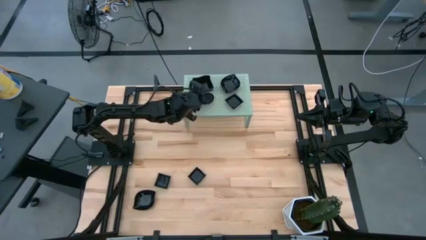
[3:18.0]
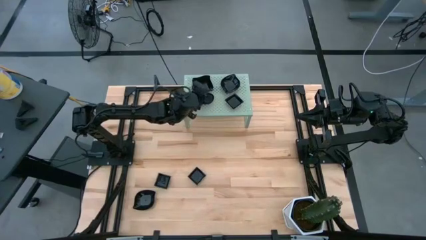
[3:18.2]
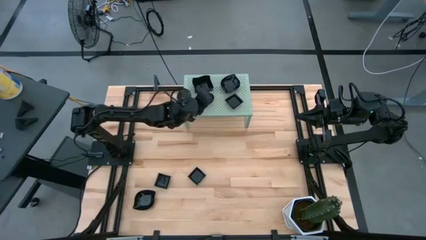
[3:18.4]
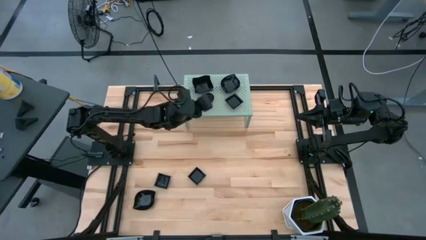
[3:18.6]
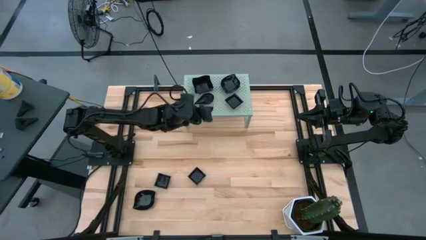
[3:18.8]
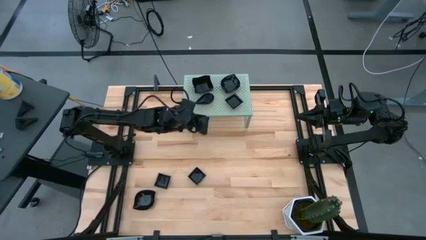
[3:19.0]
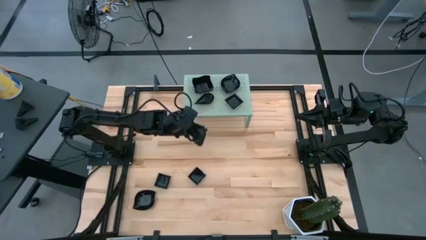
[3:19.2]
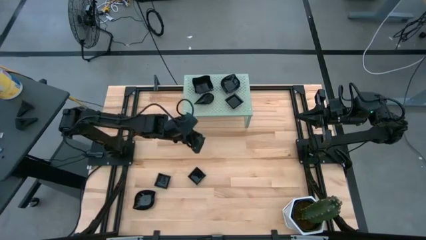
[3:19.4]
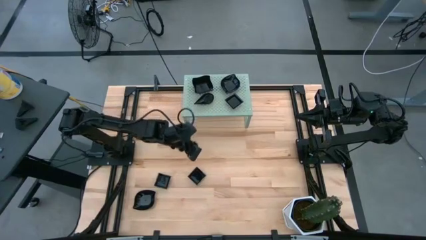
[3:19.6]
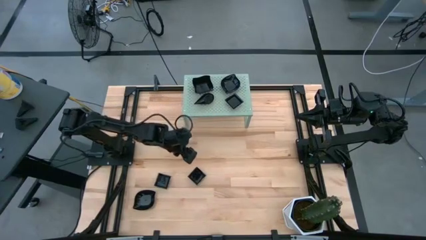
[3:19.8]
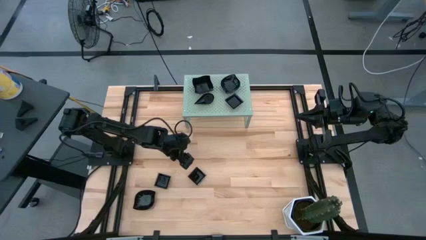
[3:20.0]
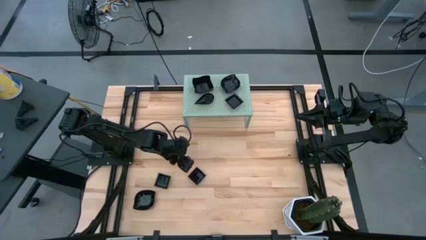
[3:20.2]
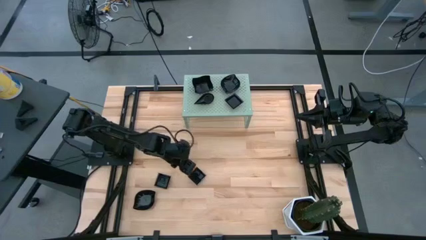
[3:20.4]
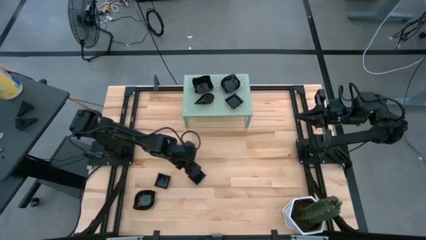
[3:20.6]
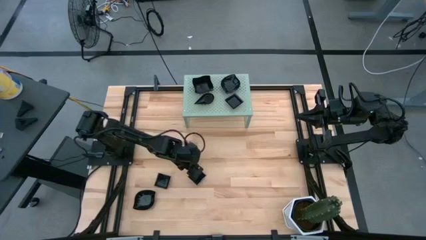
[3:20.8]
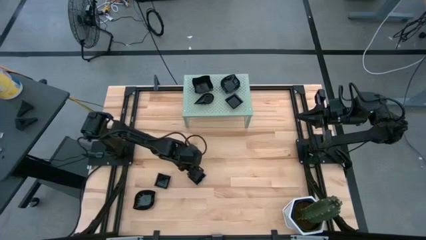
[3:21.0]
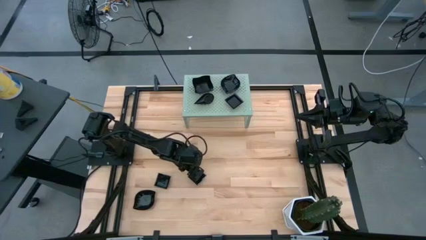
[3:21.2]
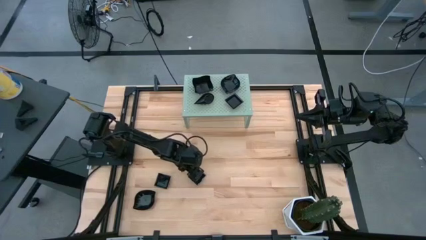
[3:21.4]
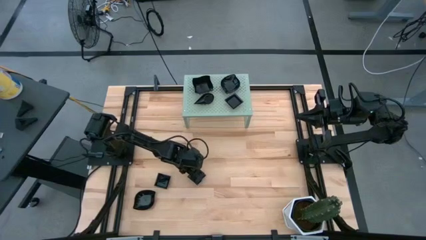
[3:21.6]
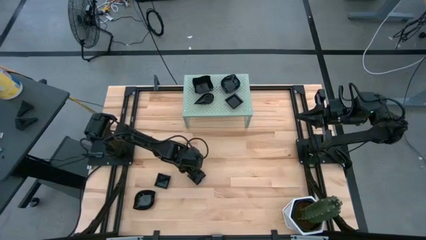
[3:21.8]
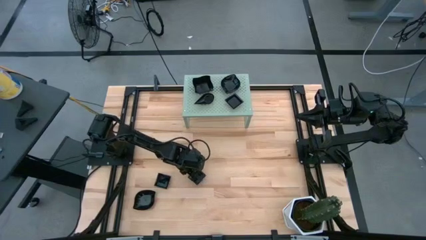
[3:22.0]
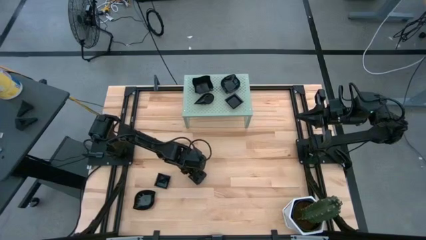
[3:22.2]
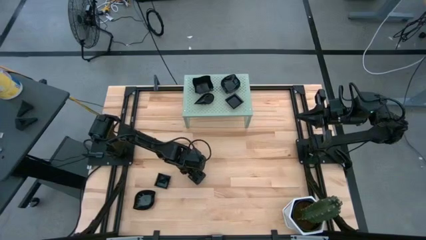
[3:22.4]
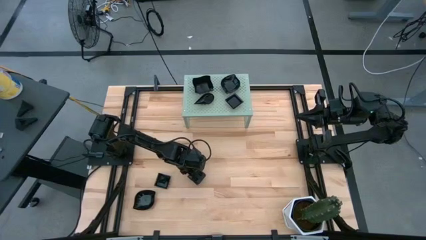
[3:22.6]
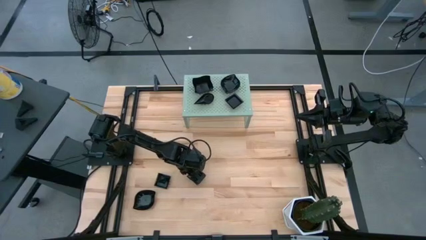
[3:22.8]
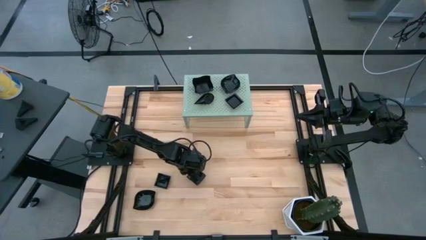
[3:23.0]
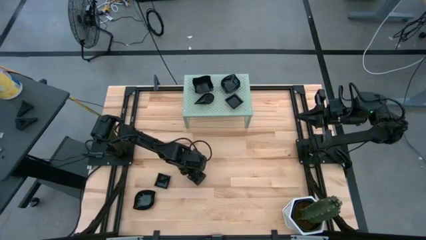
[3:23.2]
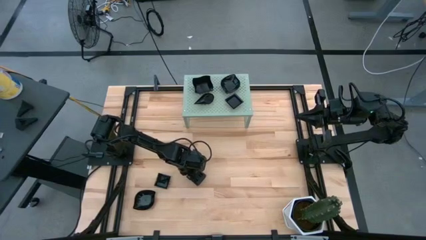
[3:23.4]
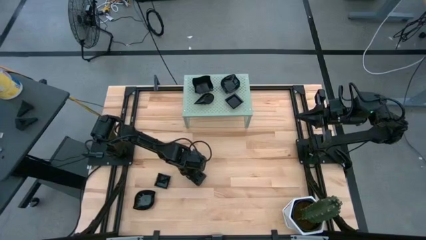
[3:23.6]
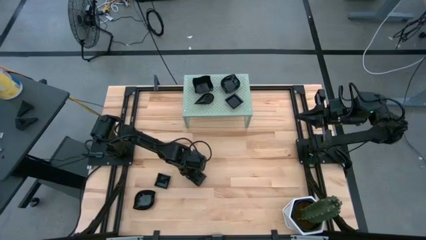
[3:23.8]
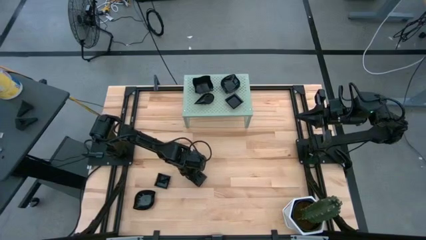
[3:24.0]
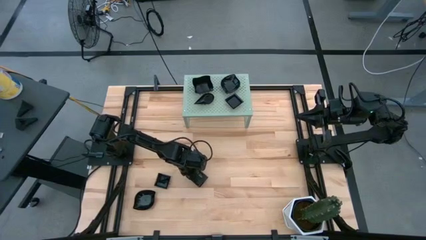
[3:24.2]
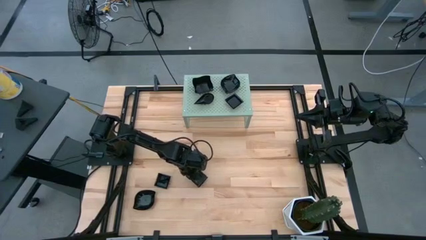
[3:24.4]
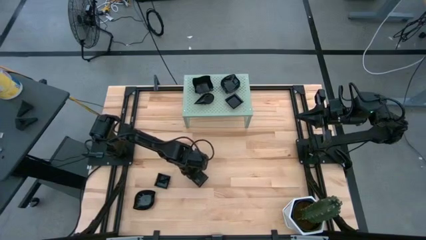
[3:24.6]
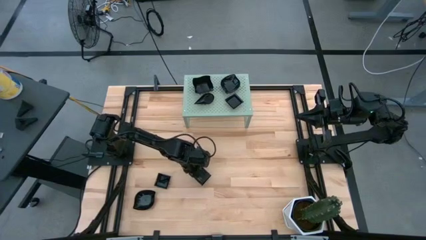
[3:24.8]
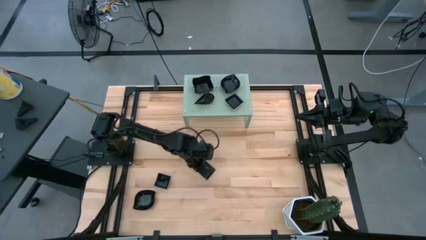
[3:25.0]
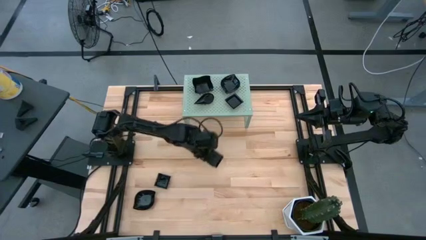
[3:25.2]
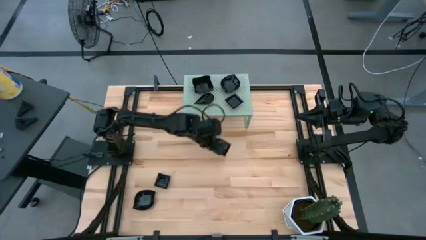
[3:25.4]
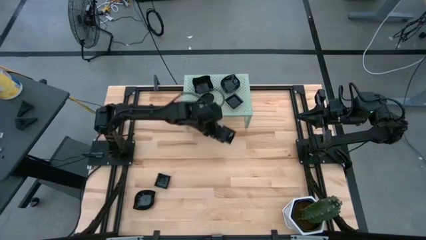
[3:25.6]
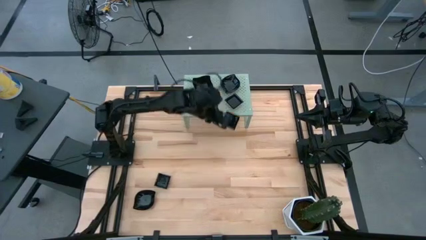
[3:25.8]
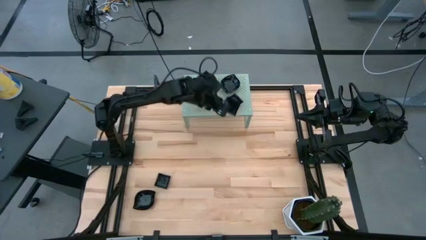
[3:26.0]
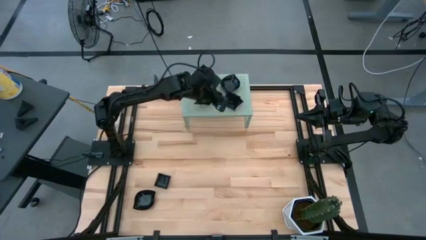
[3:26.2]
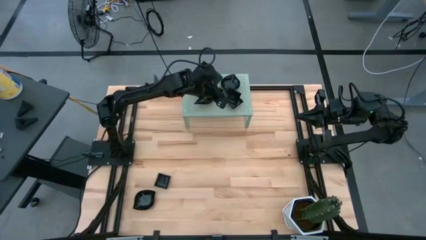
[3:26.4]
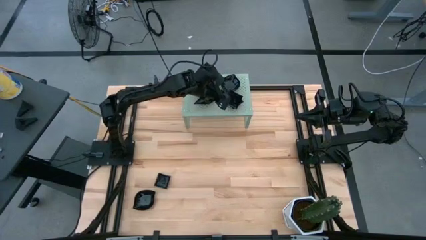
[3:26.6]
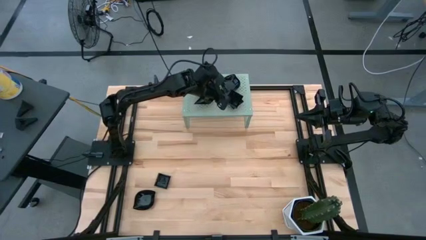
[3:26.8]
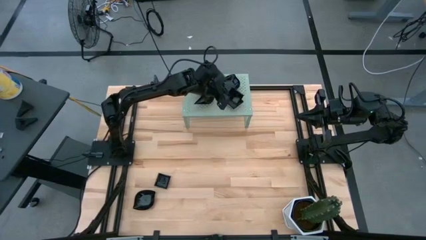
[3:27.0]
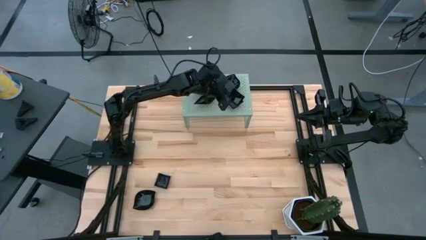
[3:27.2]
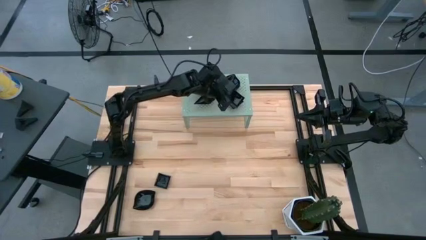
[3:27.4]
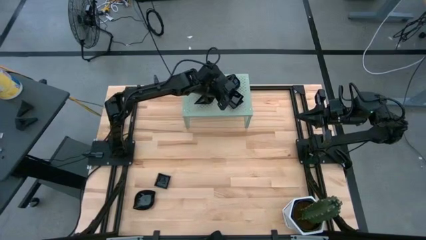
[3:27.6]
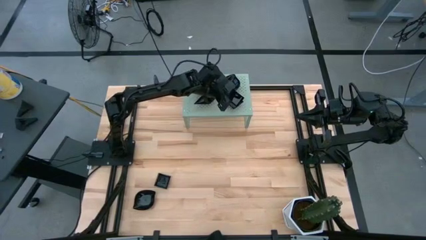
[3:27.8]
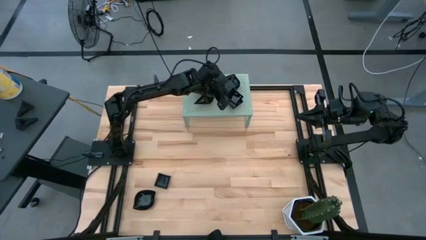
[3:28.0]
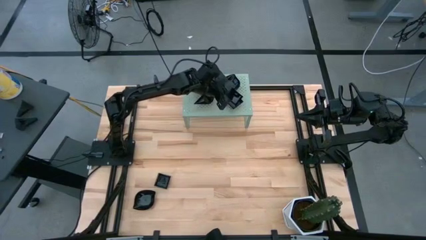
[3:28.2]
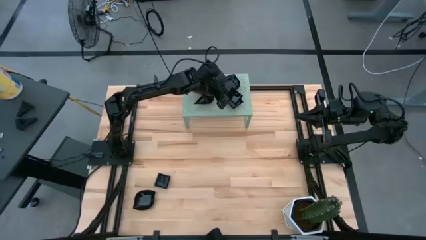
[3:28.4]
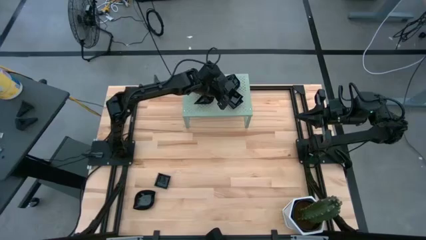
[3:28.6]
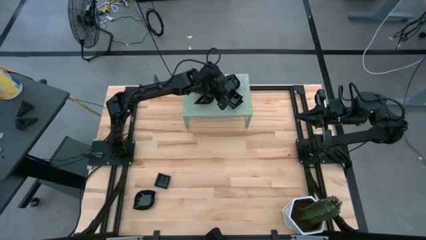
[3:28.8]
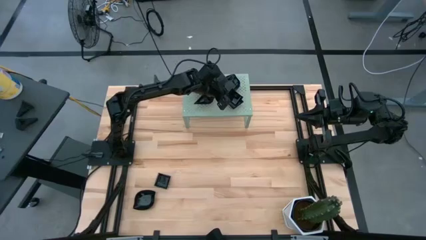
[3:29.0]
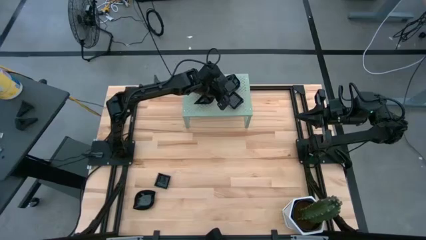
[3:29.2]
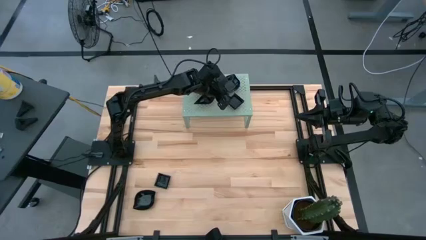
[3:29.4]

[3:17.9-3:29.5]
Task: Pick & Place Mini shaped plates
Stack the square plate on top of the square plate on the shelf

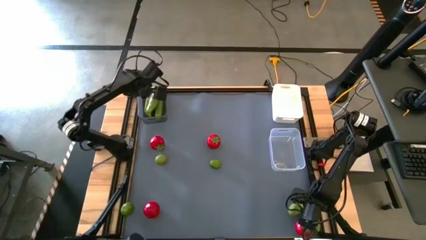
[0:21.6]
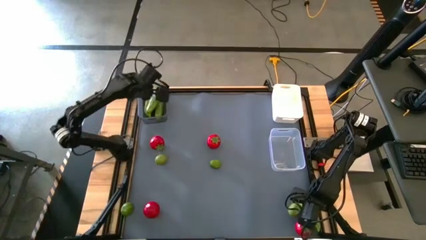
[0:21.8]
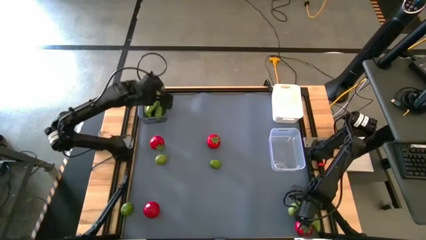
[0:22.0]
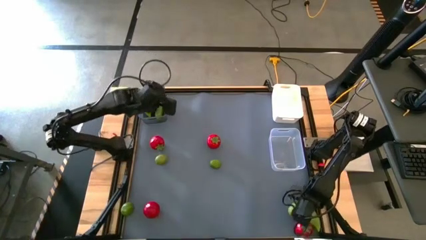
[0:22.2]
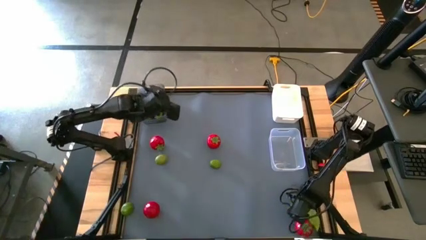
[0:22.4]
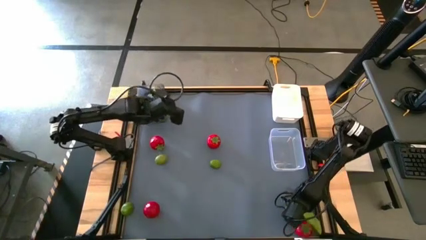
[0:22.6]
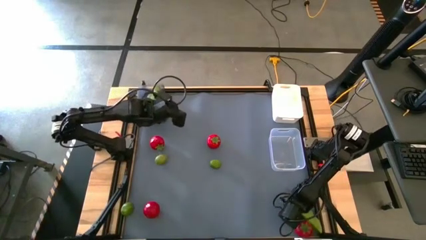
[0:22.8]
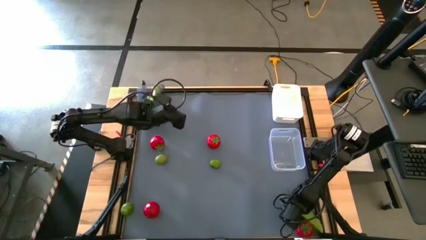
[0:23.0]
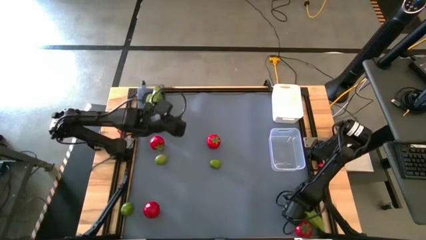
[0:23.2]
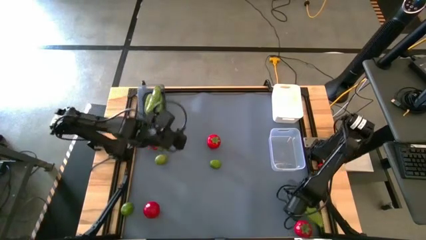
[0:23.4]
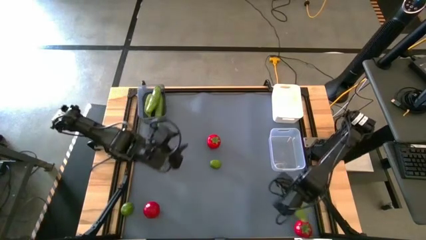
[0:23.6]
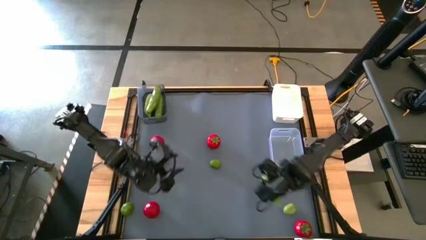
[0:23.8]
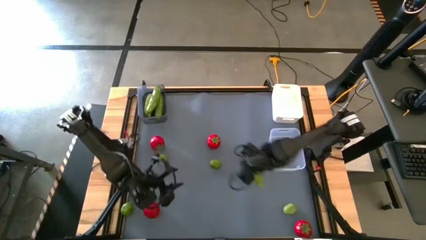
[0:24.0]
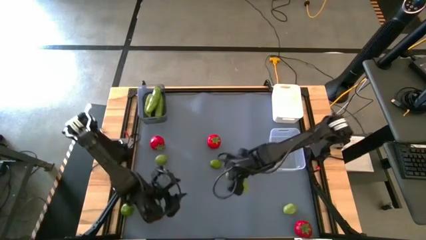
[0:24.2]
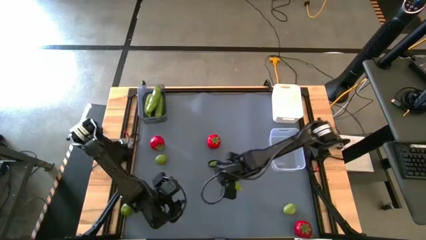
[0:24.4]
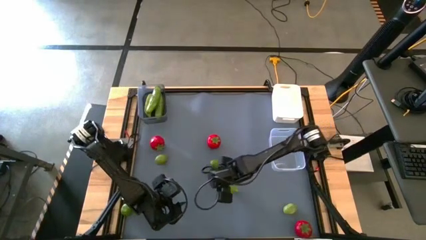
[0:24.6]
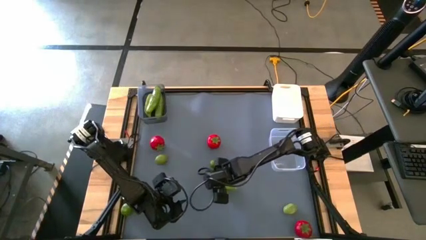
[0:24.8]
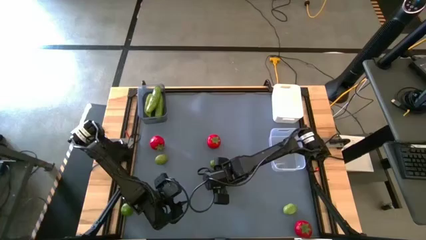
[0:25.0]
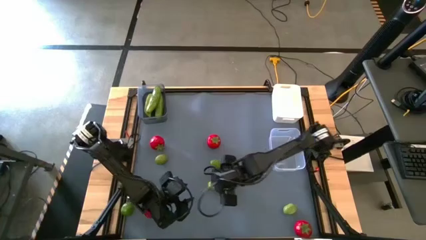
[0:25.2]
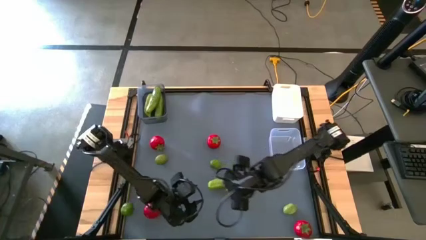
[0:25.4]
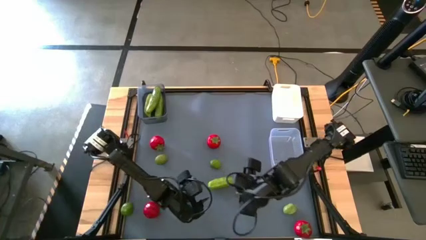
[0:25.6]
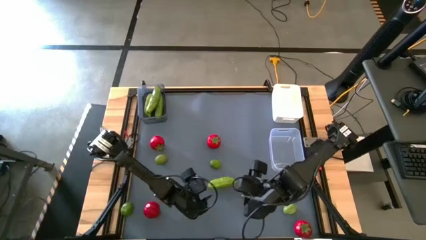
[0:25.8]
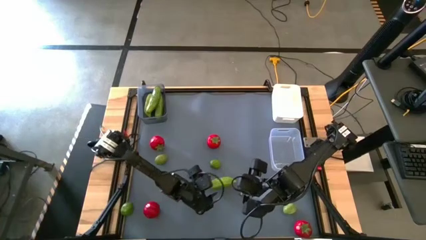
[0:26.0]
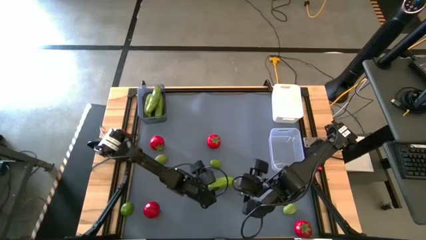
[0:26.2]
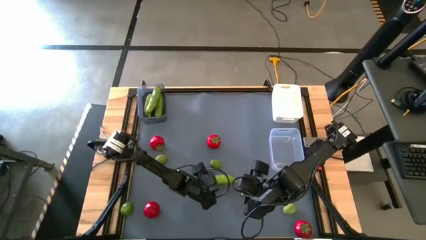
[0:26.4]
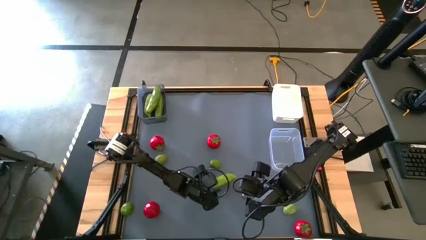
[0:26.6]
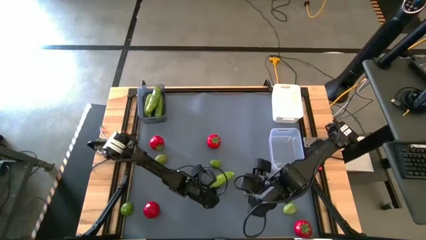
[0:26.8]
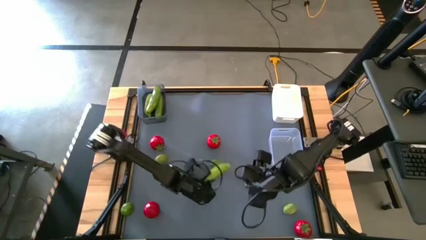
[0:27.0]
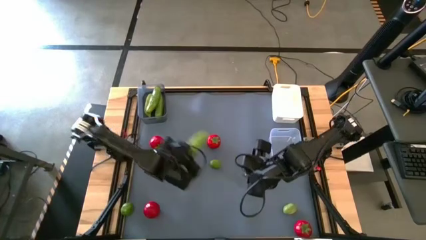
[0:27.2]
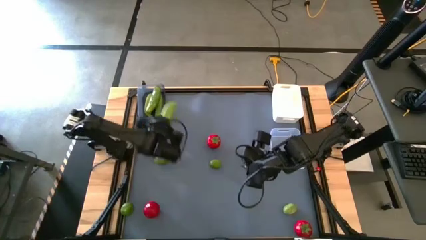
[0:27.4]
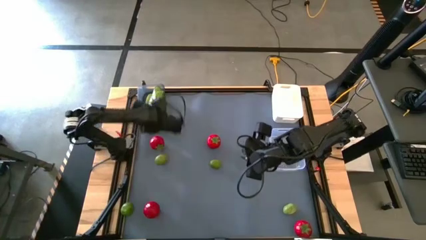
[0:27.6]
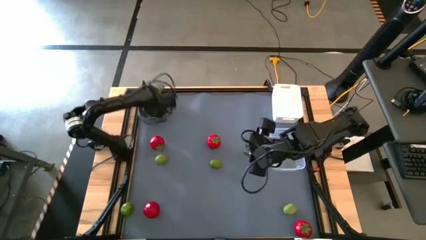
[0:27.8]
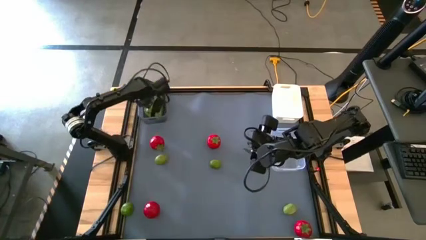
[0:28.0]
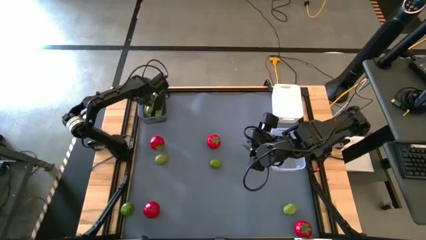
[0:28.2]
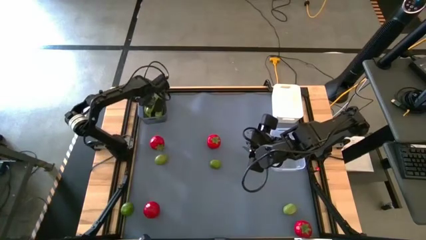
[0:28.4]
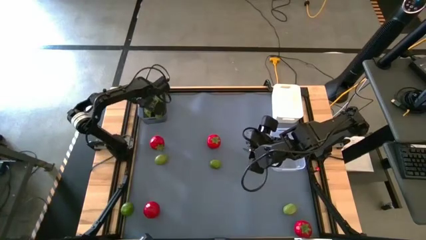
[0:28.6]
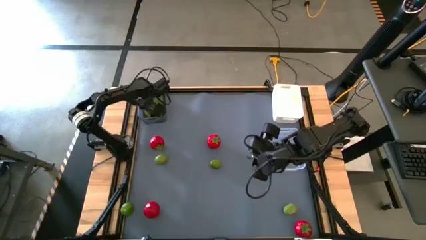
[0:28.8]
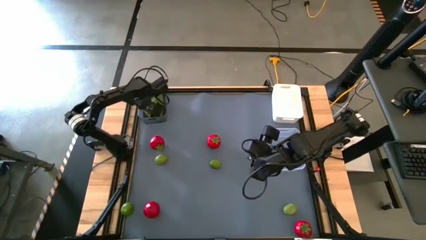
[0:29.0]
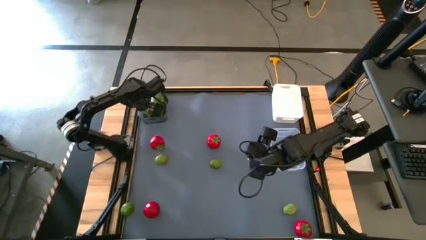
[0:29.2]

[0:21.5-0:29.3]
Task: Sort produce into baskets
Put the cucumber into the black bin
